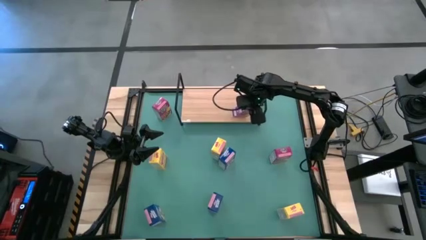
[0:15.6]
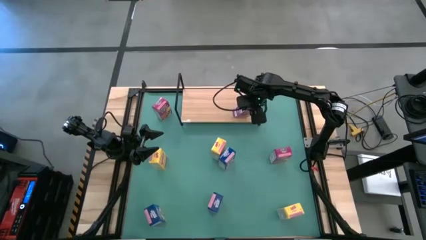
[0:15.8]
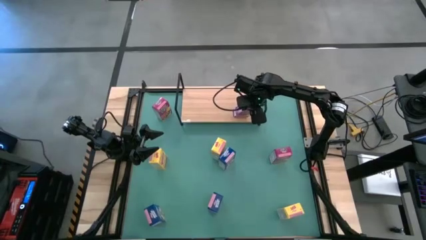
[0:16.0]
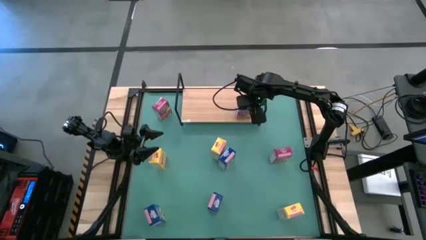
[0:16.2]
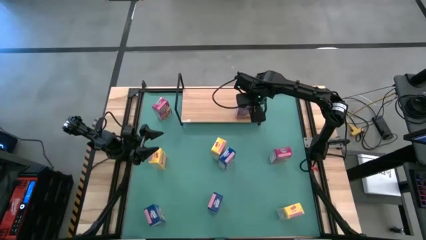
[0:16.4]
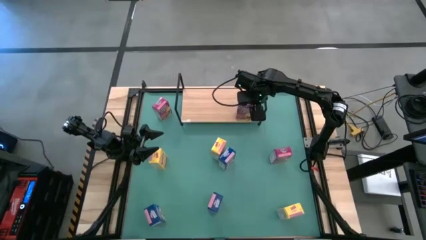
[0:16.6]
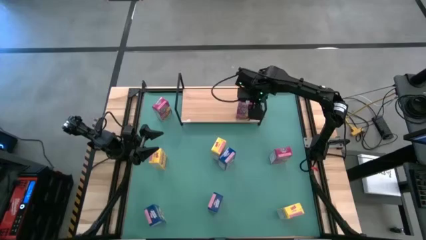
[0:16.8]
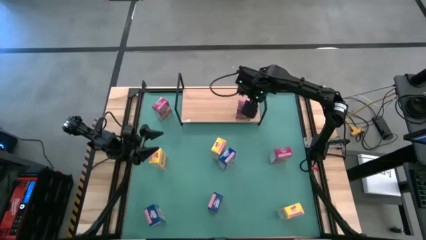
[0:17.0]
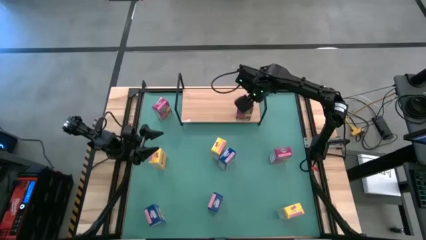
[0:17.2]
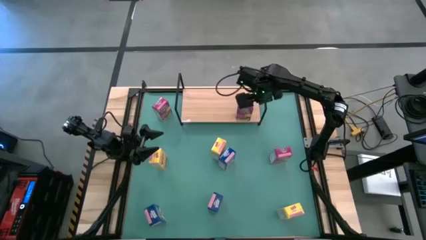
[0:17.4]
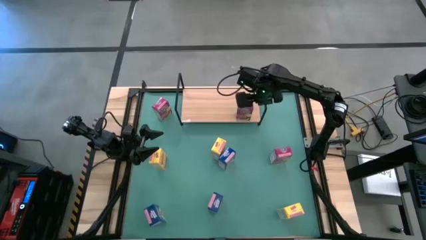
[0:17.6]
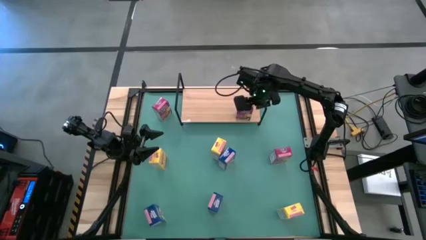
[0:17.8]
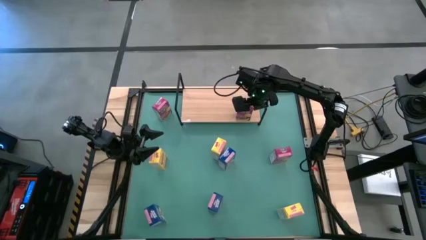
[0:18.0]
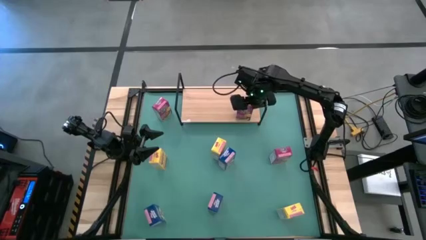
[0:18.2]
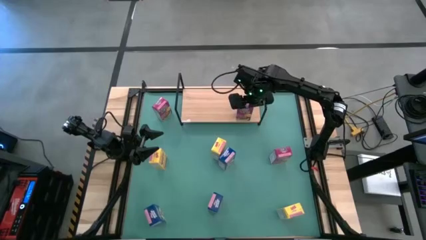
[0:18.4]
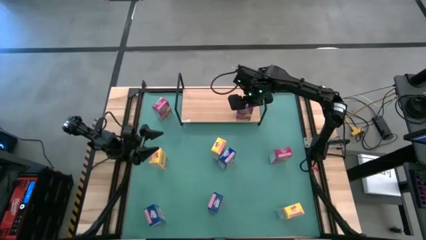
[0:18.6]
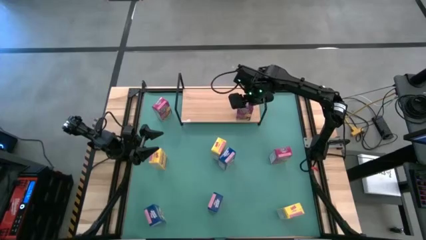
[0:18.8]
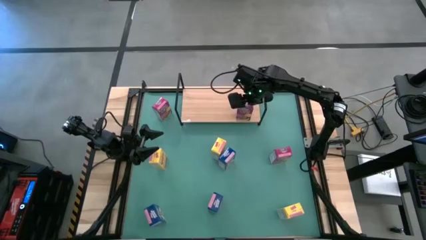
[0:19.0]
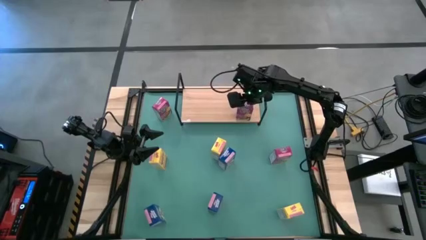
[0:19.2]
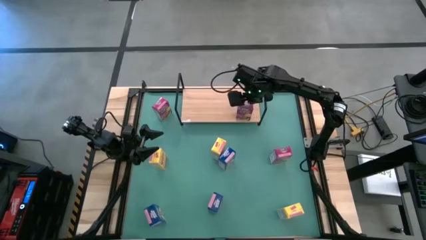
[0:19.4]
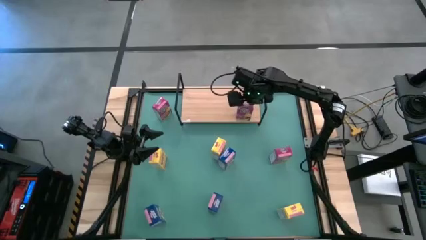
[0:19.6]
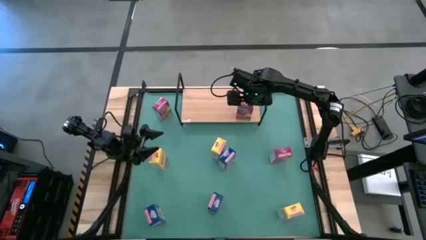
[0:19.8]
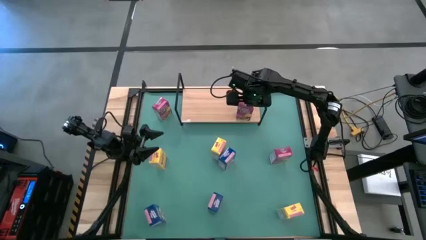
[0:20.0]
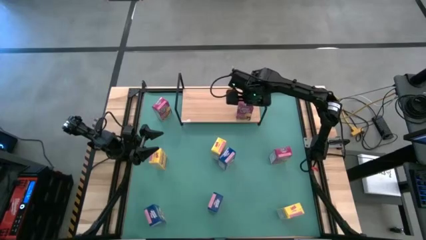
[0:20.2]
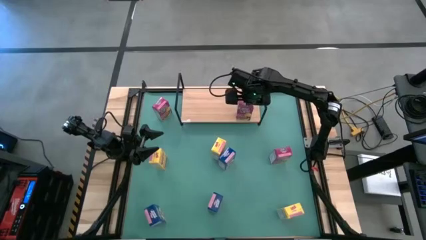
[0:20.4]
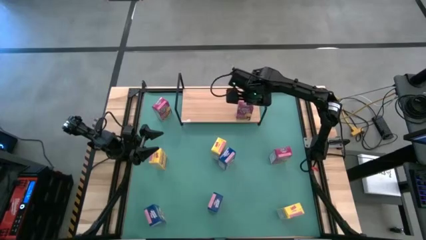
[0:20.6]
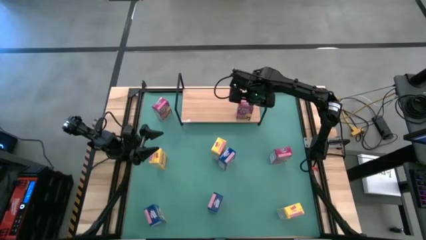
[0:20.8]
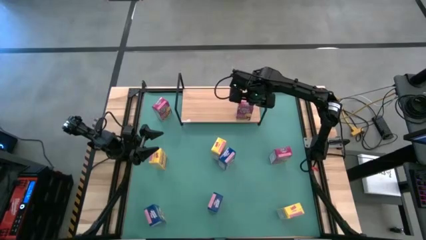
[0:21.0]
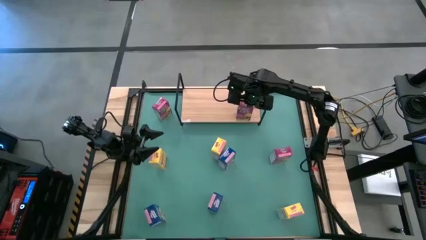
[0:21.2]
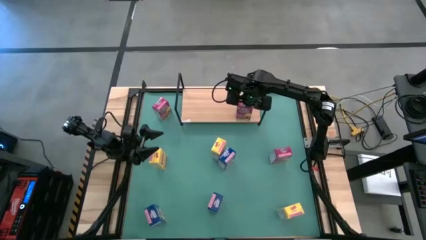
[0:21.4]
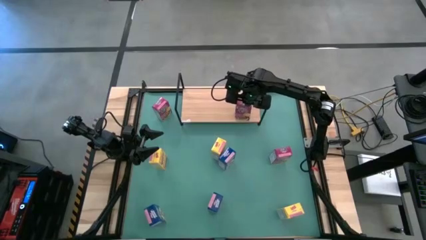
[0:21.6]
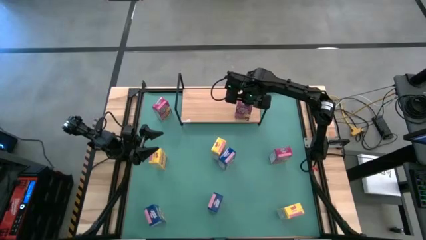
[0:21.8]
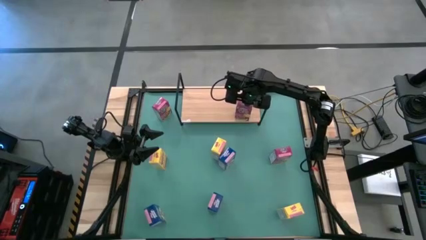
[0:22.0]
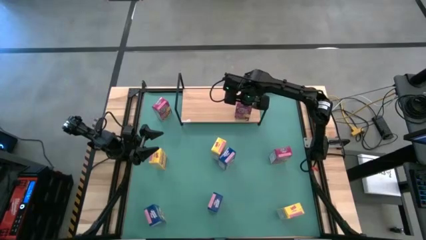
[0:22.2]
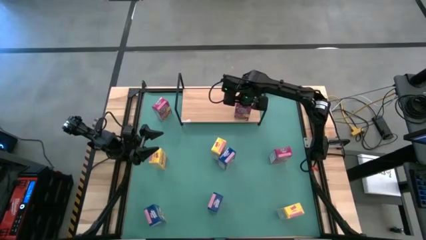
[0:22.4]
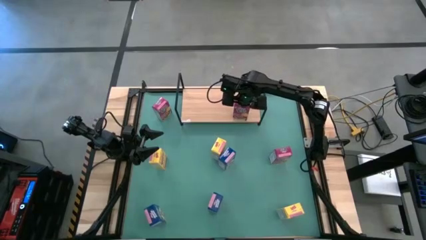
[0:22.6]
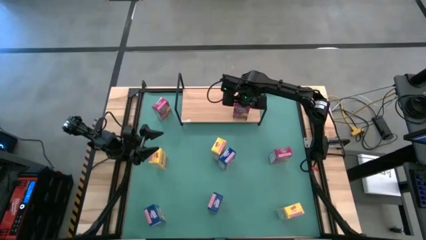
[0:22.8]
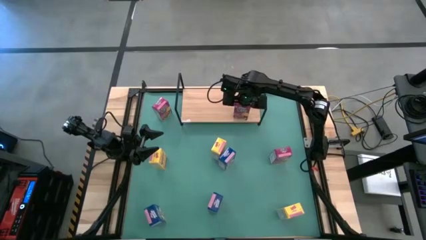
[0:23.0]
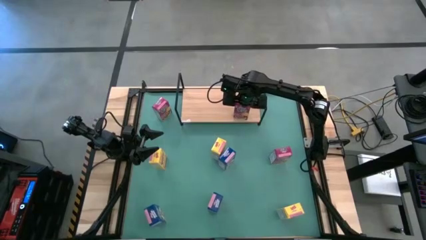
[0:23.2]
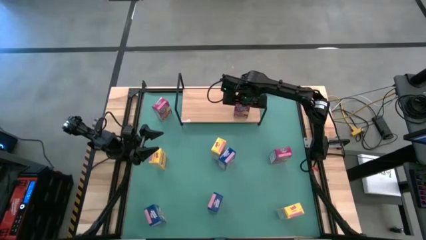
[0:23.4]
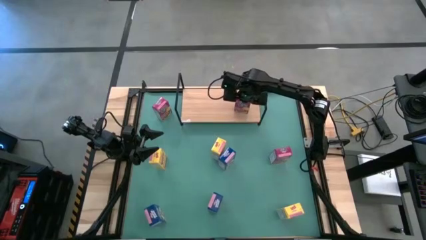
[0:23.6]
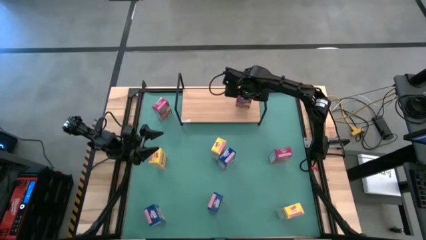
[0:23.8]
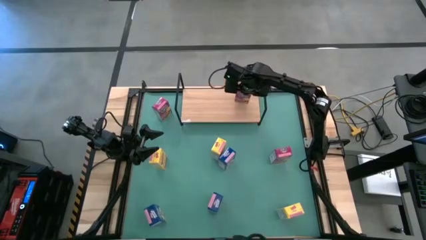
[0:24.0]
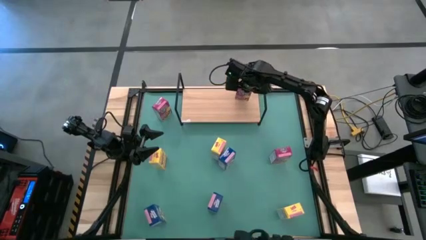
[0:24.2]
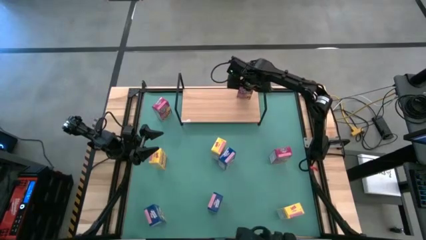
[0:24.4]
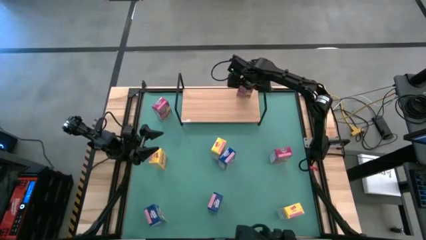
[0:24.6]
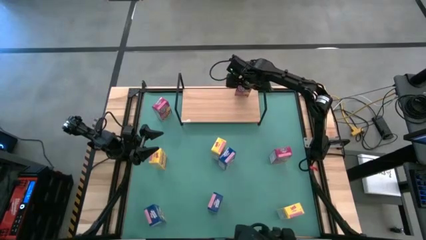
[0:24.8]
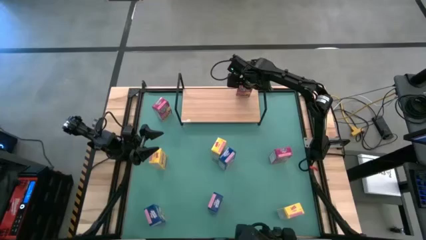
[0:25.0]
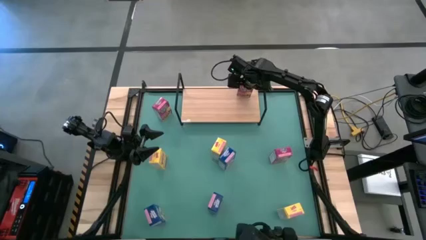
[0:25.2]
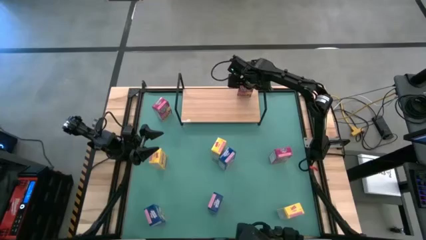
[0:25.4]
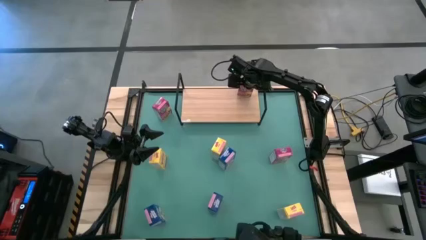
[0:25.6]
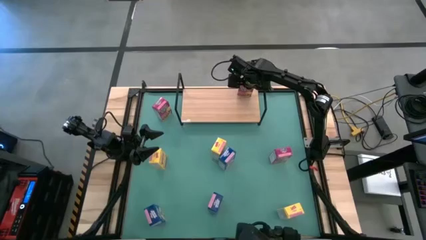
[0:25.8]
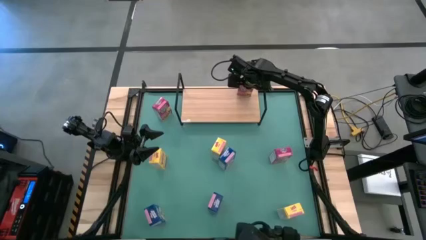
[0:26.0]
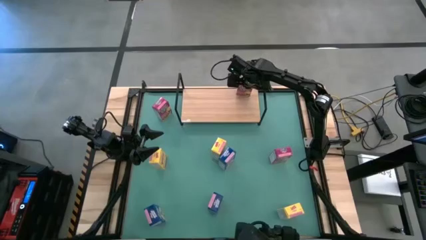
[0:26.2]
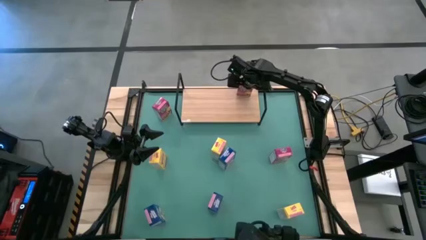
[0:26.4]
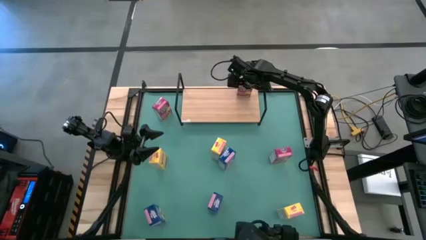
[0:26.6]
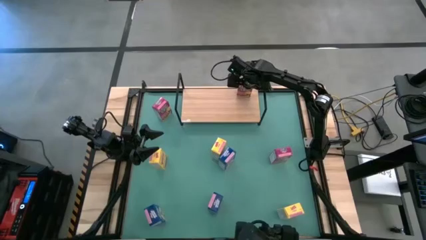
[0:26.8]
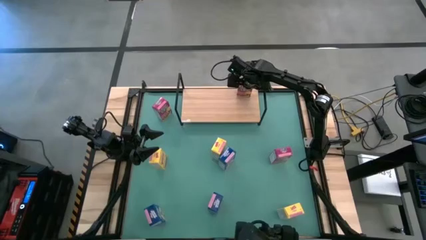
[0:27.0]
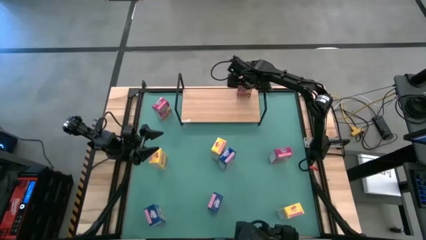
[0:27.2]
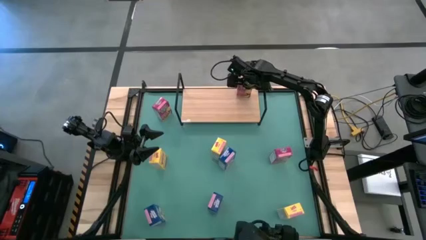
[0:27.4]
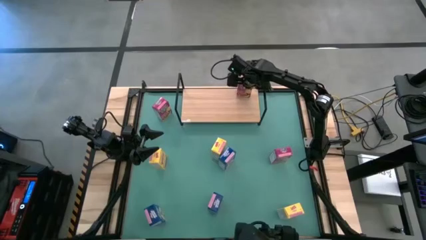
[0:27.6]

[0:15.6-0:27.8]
Task: Stack cereal on shelf
Put the top right pink cereal box on the shelf

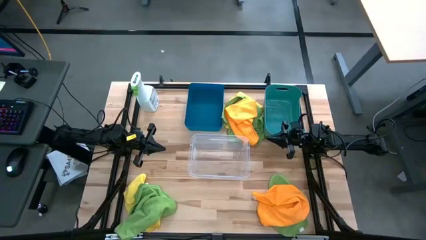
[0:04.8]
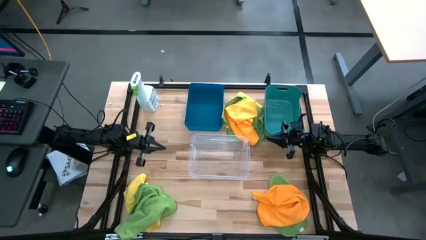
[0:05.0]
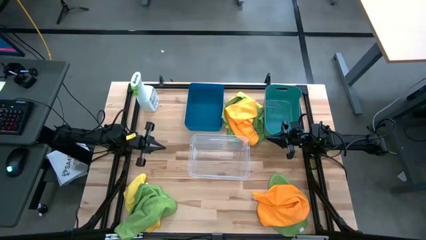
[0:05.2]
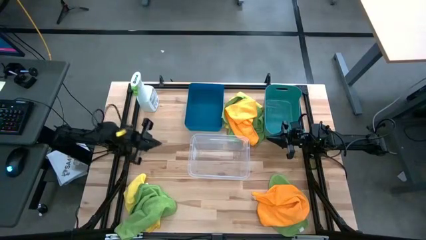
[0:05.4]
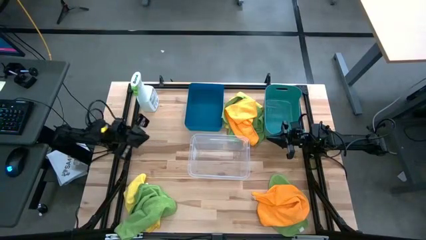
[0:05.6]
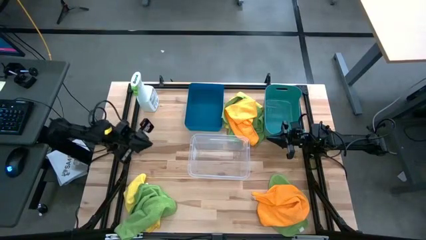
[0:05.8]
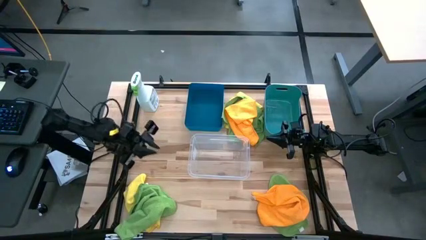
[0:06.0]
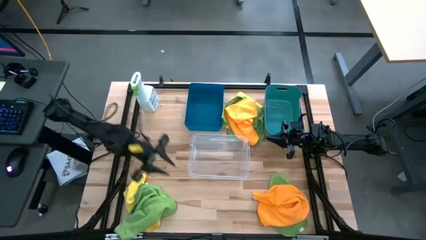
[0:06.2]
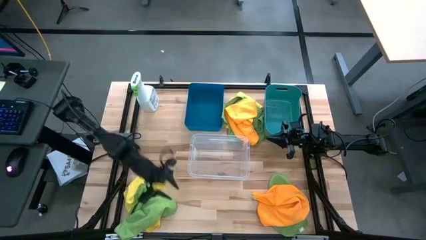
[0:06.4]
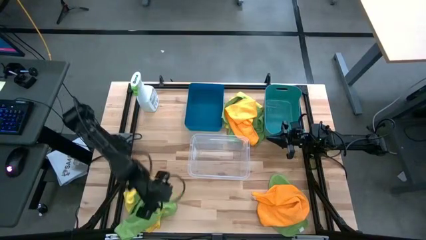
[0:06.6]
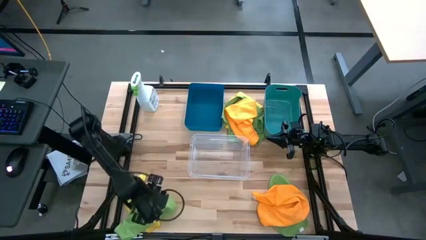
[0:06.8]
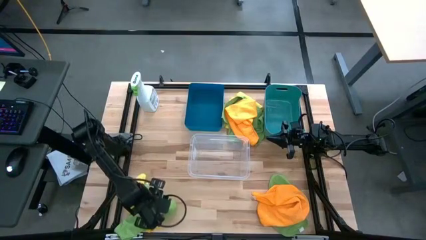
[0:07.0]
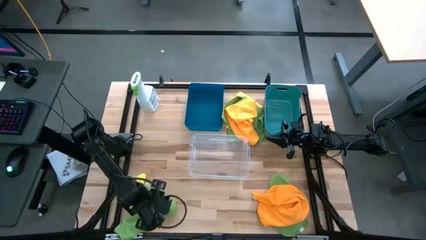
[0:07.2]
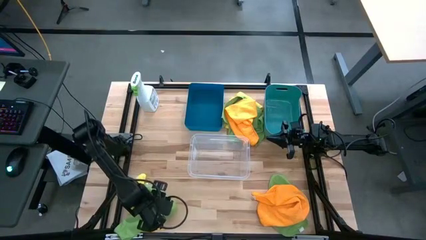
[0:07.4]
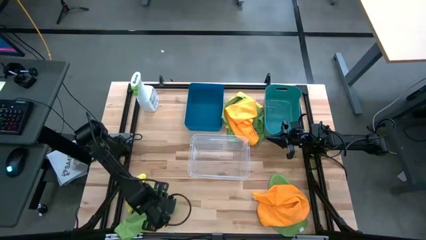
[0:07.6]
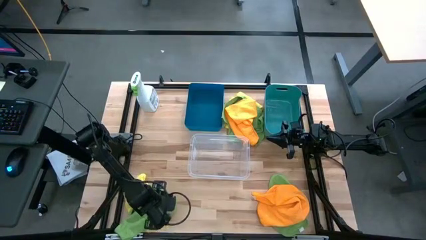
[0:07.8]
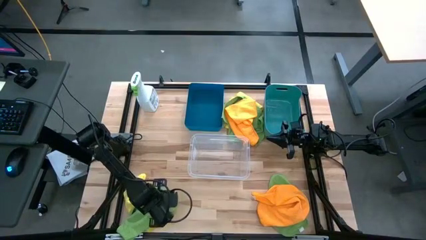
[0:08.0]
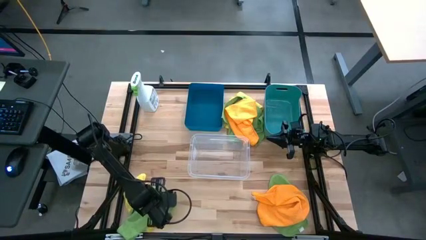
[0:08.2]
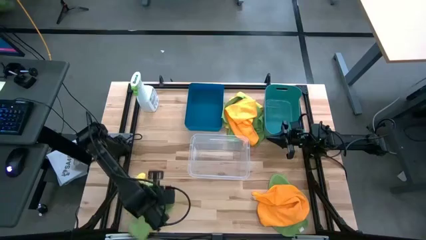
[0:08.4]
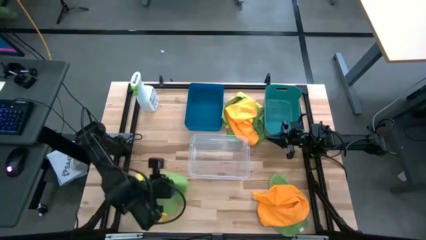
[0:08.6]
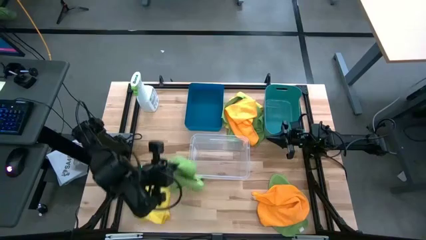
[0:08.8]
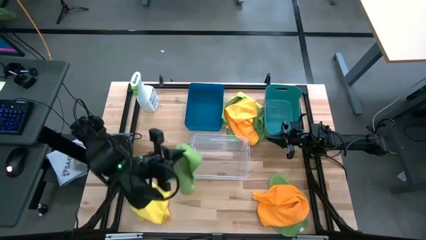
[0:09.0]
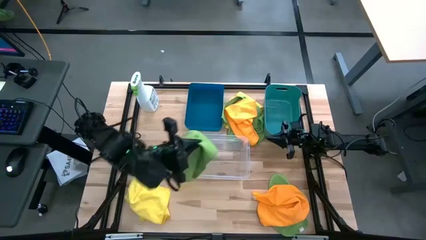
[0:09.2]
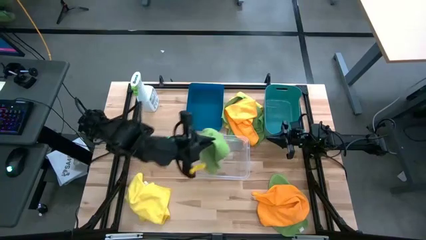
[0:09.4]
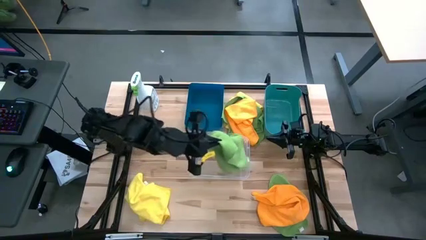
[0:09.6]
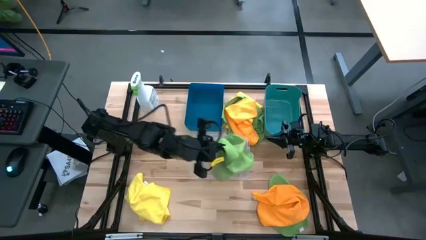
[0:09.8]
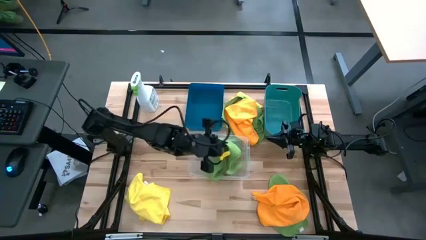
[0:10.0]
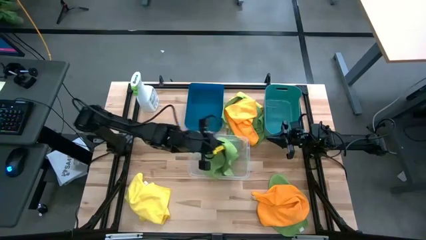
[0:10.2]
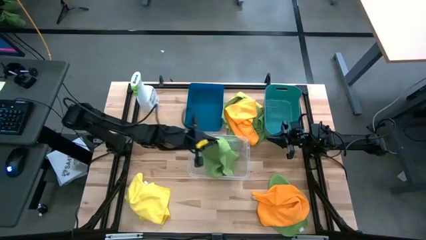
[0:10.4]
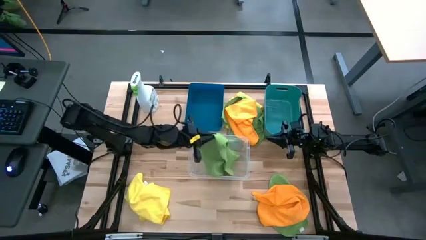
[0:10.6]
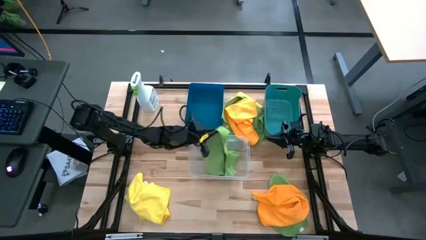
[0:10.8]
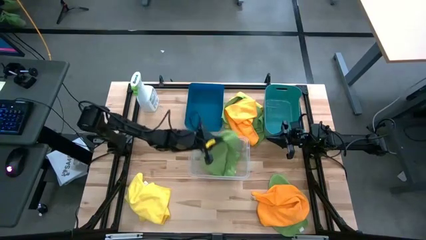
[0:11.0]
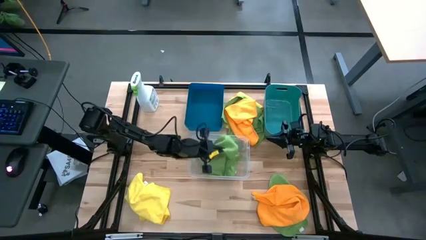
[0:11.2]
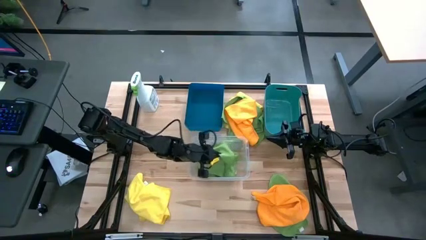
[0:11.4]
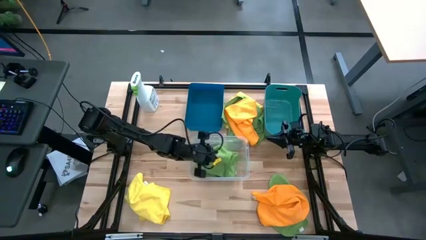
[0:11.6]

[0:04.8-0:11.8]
Task: Sort microfiber towel by color & place in baskets
Put the bottom left green towel into the transparent bin
